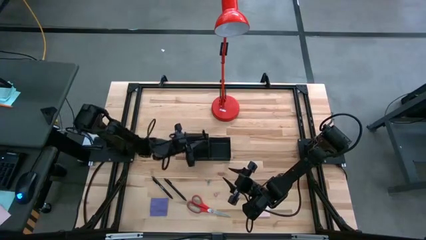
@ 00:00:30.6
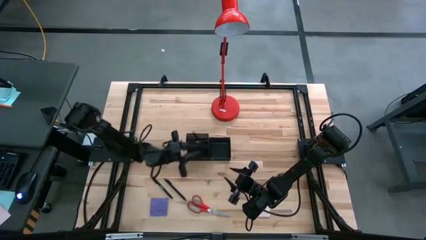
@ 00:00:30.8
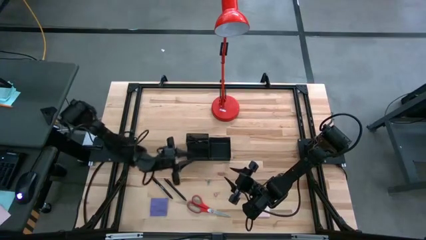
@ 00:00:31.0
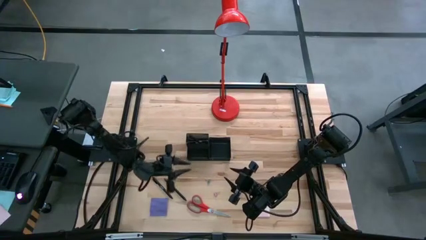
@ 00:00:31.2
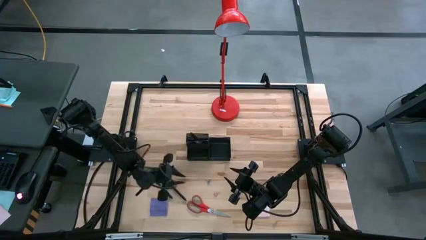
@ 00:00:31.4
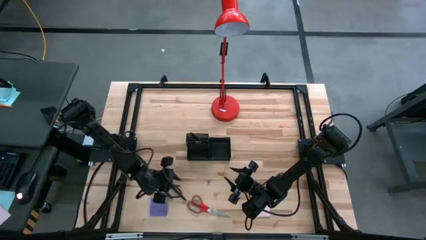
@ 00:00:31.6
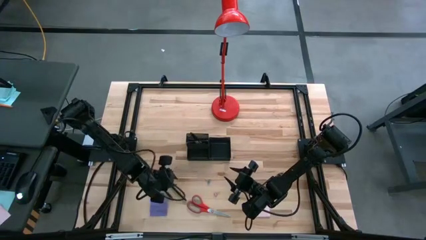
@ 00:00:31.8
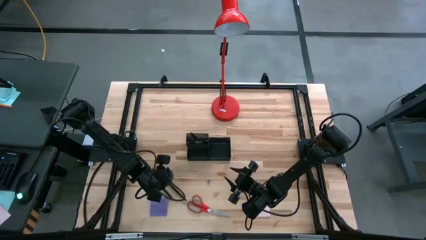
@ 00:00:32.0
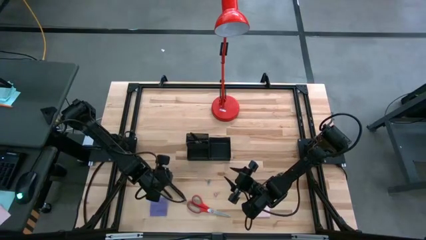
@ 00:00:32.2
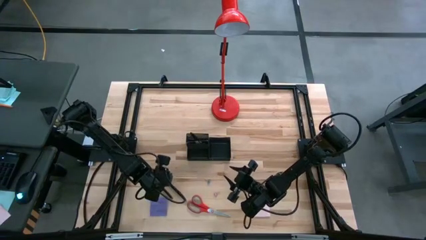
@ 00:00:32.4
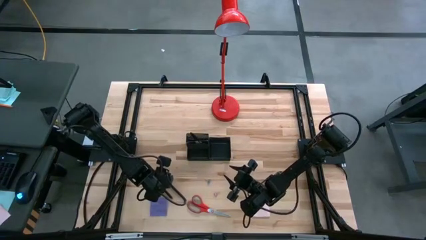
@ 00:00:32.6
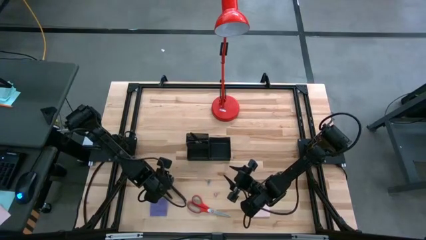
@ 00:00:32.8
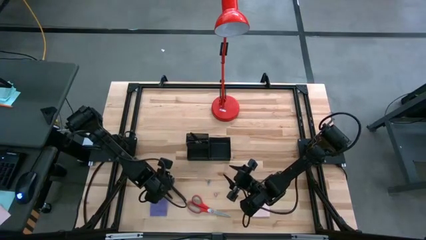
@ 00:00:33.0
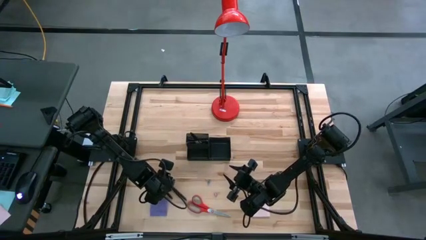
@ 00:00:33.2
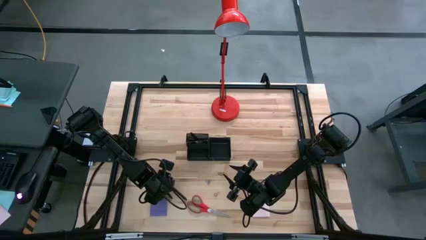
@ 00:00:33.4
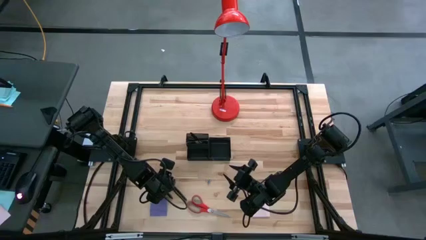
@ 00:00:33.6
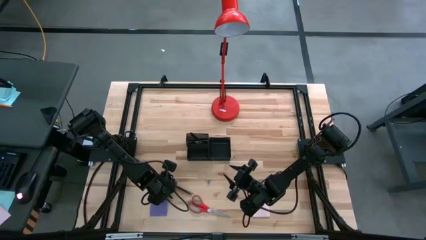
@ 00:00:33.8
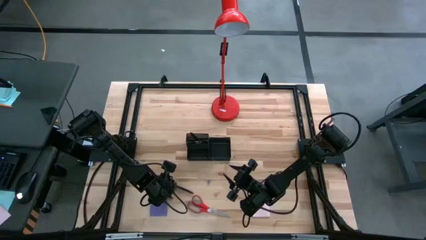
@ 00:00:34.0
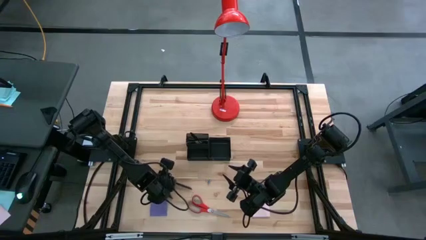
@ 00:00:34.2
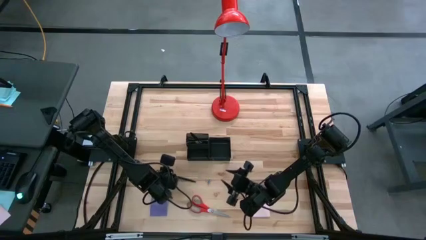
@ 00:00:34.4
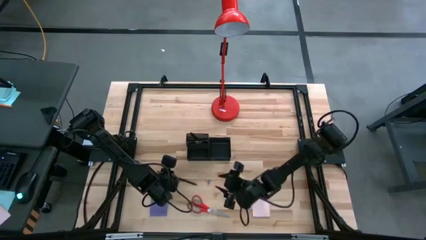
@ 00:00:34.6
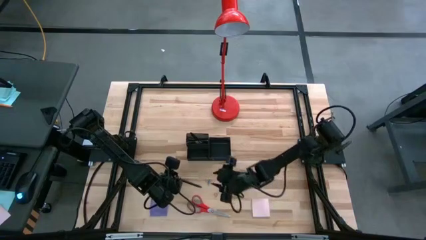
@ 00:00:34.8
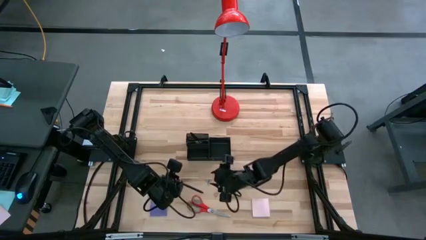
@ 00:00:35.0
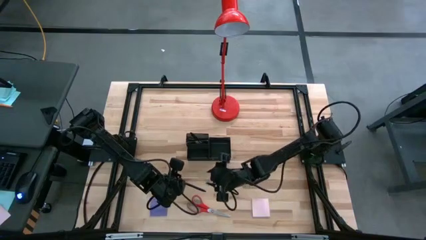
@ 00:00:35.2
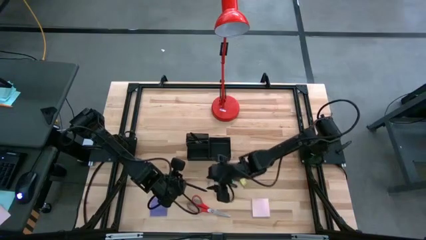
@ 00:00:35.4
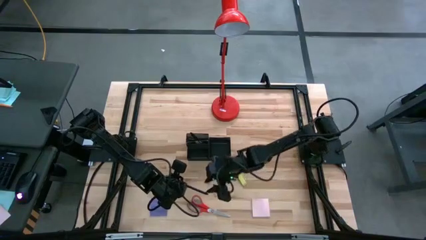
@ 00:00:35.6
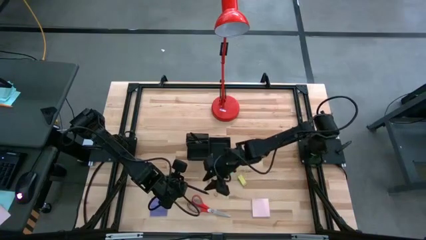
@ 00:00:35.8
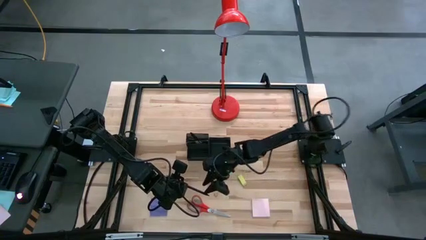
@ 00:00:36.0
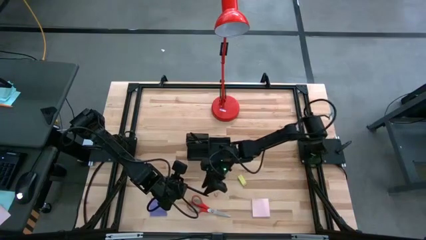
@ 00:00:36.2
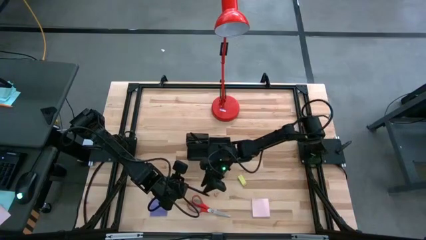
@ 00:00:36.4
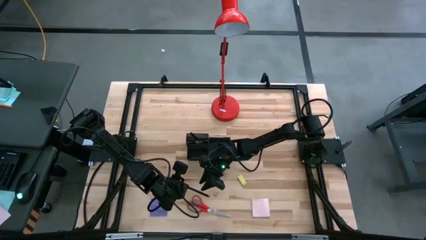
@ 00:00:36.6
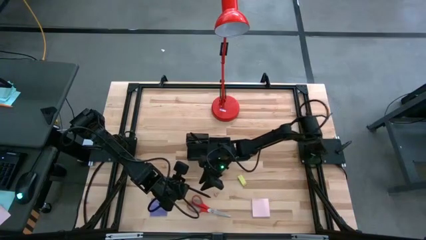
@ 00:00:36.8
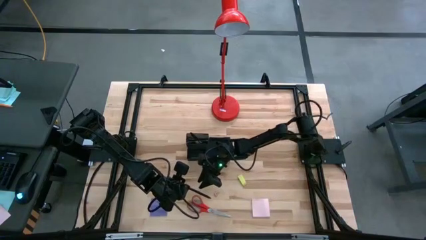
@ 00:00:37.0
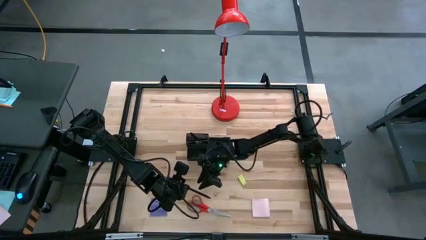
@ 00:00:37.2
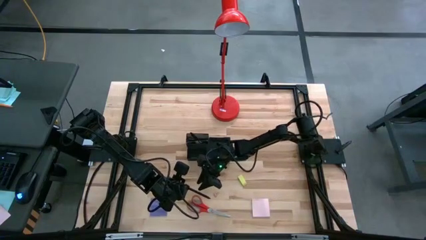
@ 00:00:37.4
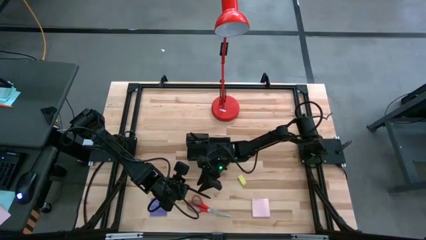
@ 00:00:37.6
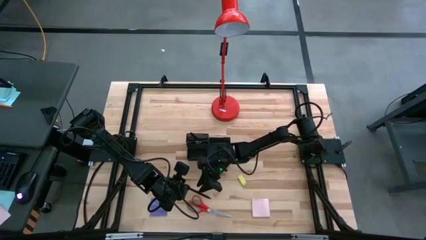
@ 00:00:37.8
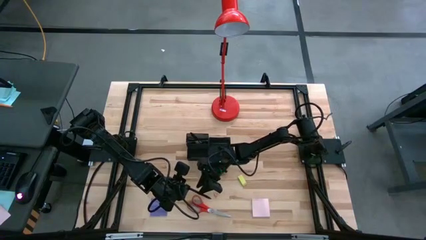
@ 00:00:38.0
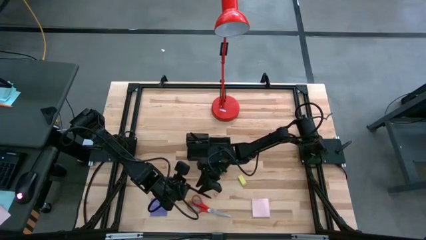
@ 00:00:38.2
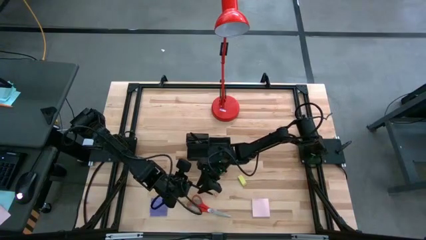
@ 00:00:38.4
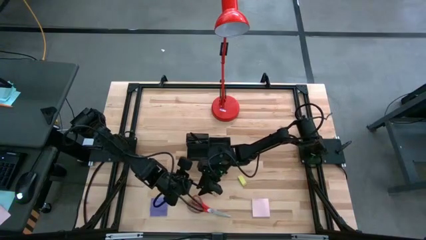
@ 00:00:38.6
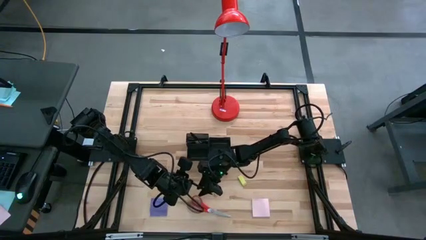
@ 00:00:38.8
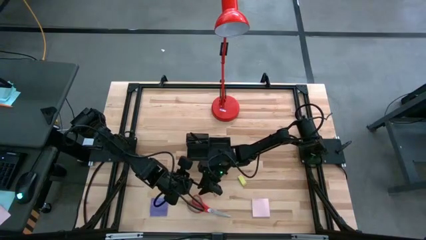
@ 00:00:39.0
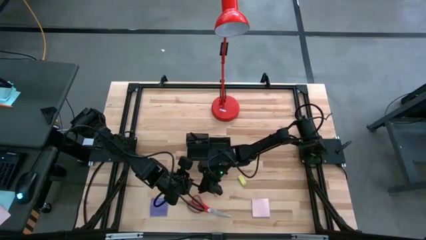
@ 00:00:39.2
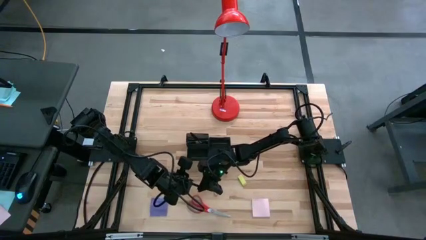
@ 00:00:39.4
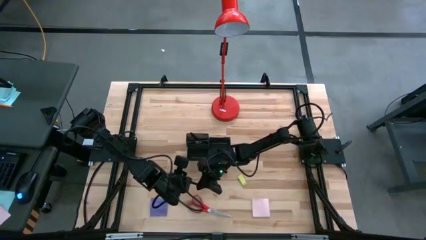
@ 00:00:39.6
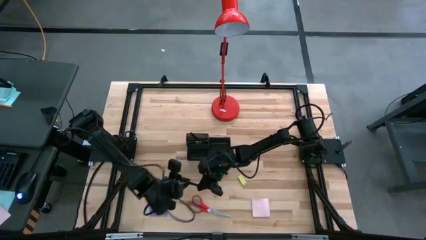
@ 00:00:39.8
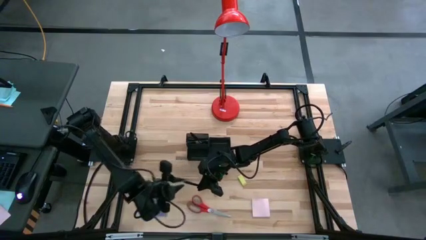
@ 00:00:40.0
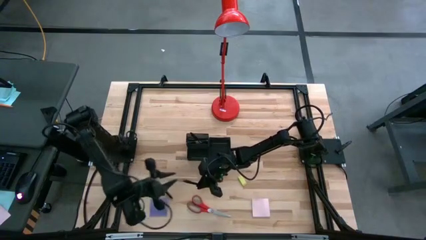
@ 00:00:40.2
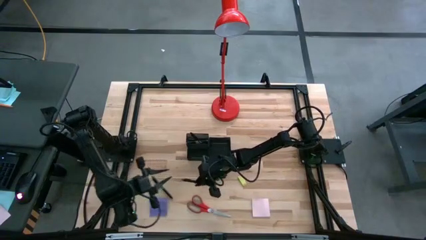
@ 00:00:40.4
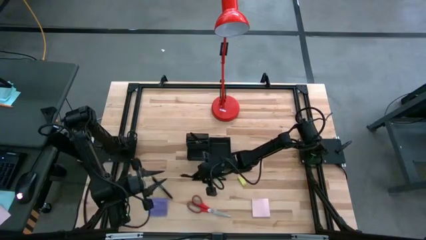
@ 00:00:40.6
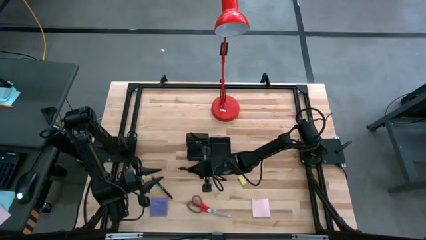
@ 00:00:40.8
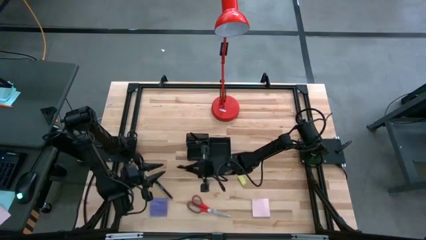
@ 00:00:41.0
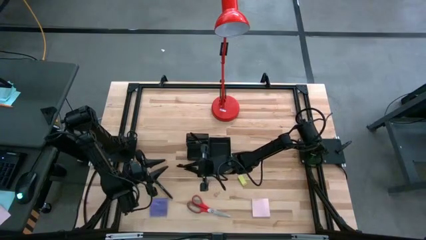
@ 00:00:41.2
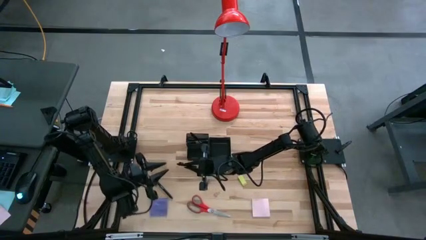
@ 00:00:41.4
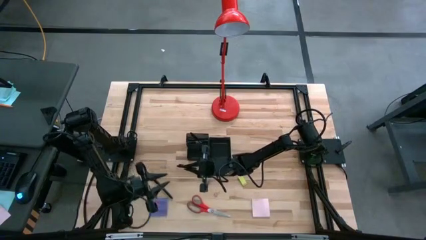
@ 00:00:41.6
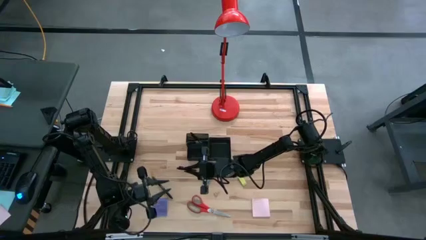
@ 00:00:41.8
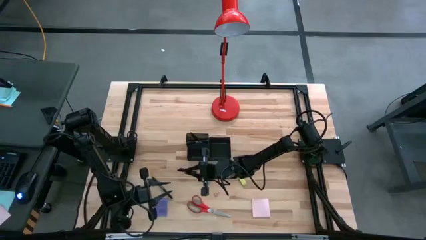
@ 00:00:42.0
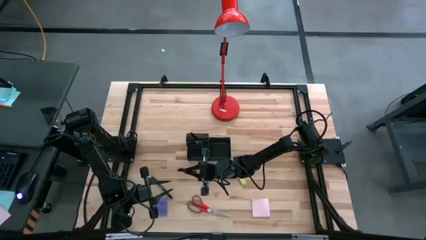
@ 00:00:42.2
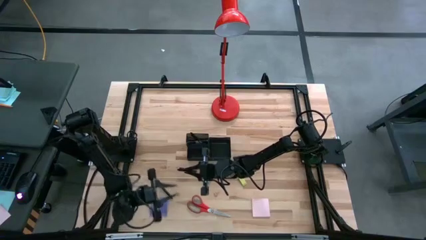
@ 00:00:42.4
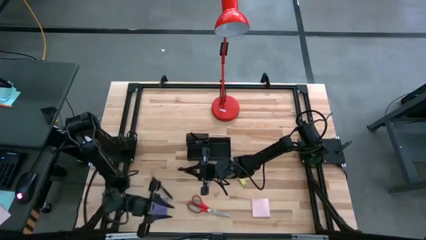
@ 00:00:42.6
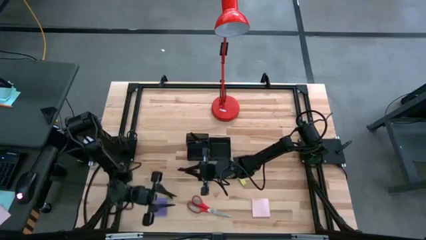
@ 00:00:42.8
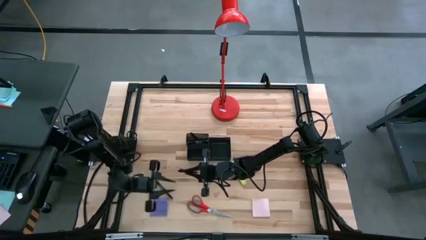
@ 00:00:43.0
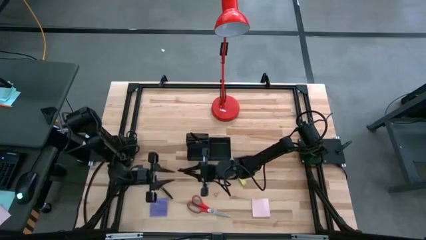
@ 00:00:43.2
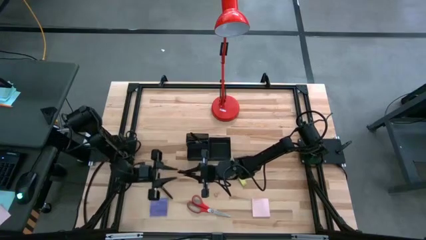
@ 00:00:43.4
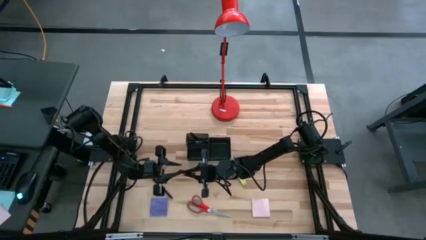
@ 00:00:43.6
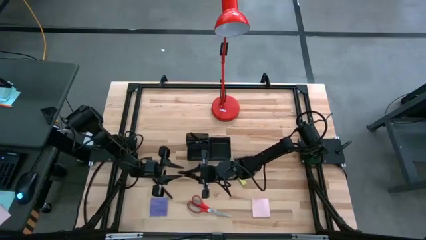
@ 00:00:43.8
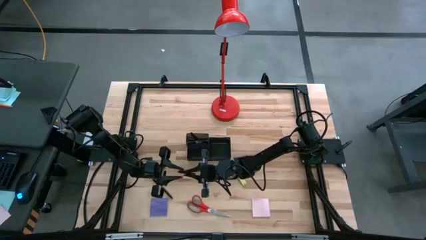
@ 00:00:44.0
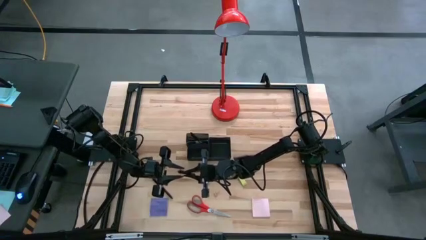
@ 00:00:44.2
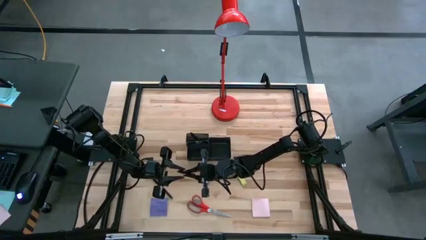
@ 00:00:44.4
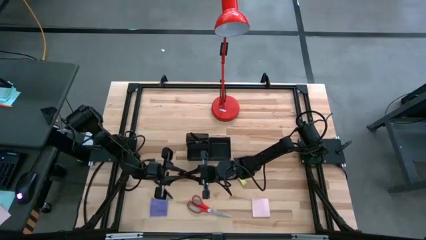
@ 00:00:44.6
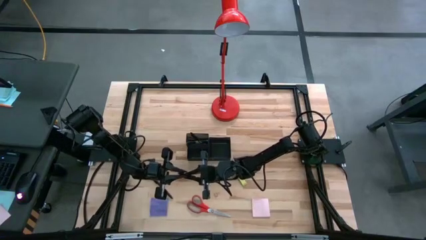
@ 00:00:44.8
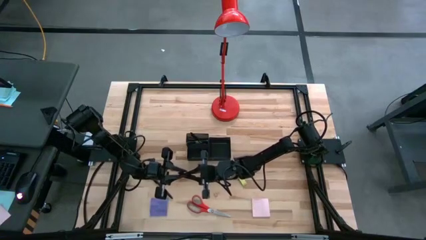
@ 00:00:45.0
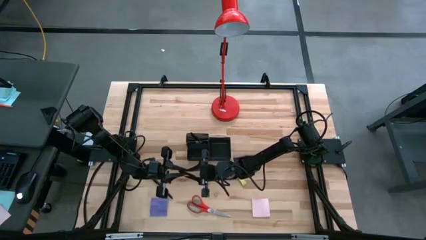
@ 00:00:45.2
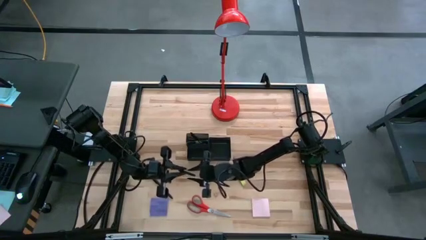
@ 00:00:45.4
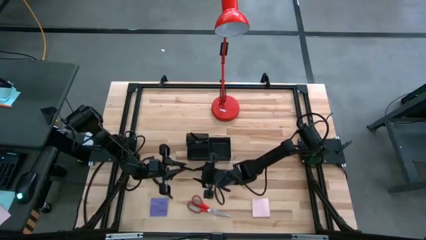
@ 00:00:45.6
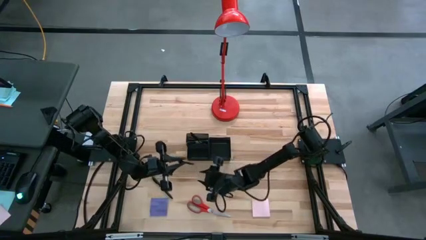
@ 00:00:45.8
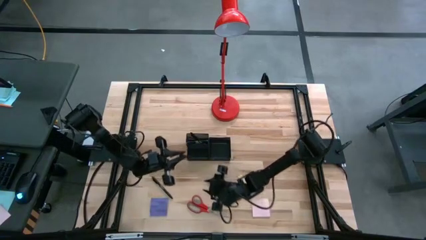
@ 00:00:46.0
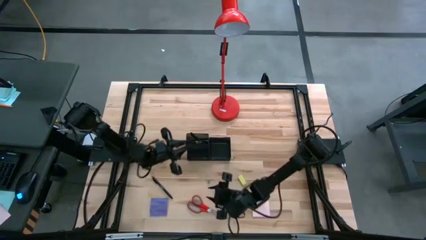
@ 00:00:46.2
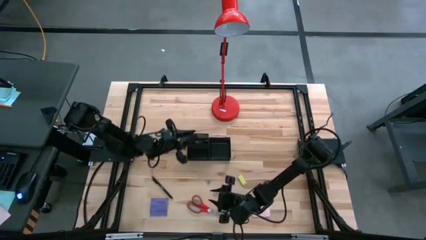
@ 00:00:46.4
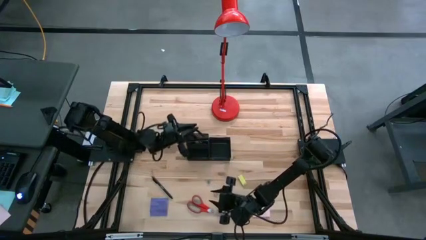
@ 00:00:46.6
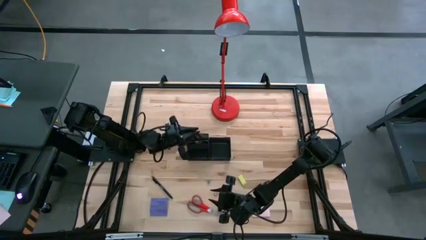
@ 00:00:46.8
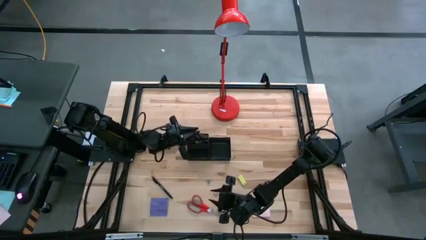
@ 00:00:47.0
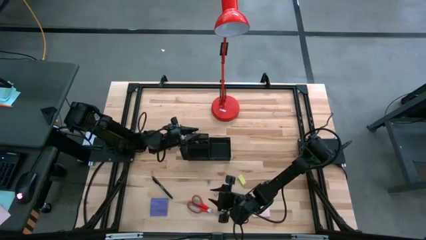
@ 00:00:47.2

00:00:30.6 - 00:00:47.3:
Task: Pick and place office supplies into organizer
Put the black pen into the desk organizer
